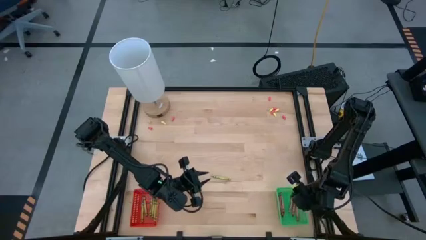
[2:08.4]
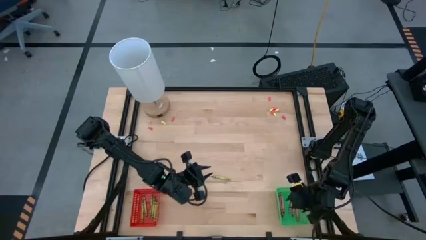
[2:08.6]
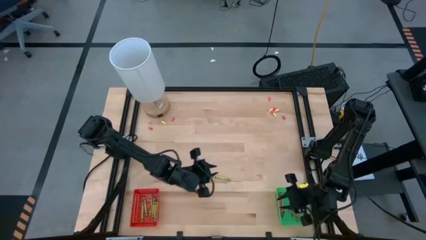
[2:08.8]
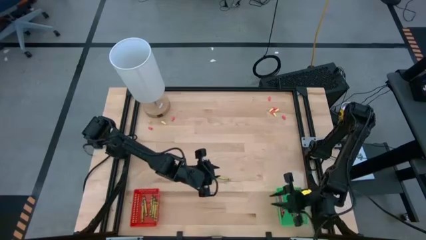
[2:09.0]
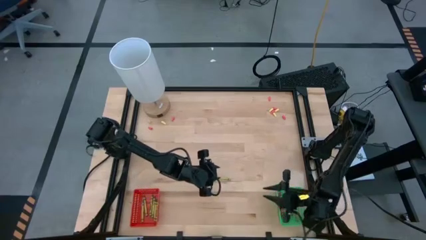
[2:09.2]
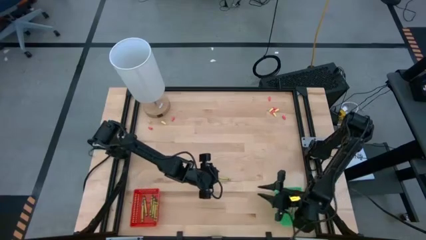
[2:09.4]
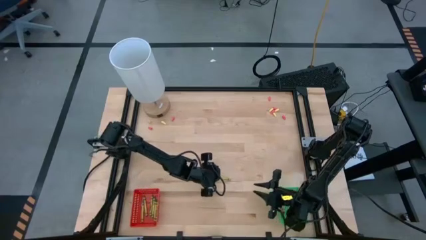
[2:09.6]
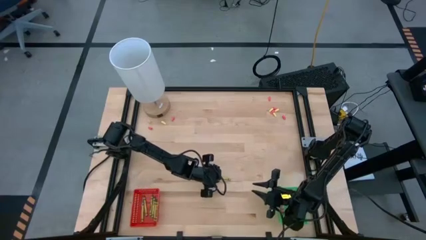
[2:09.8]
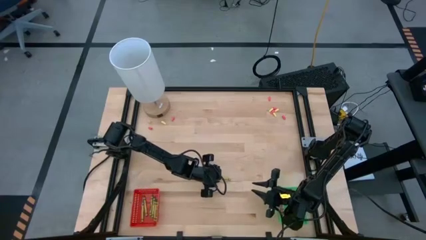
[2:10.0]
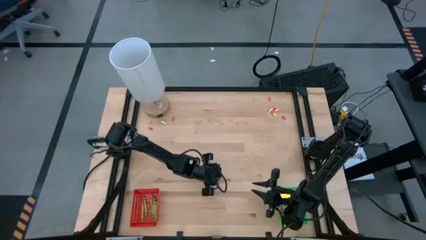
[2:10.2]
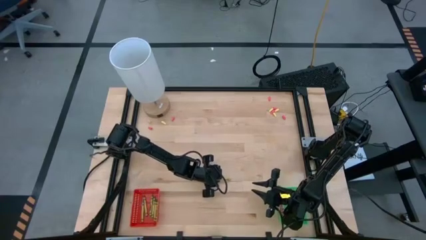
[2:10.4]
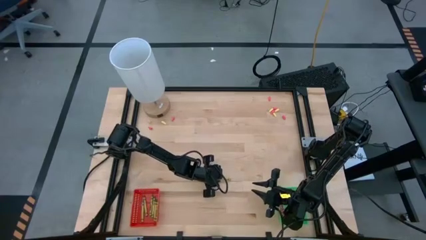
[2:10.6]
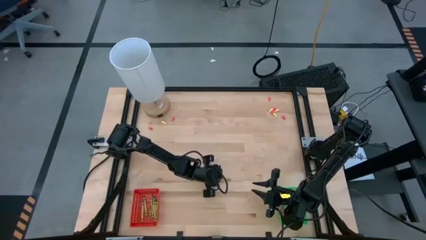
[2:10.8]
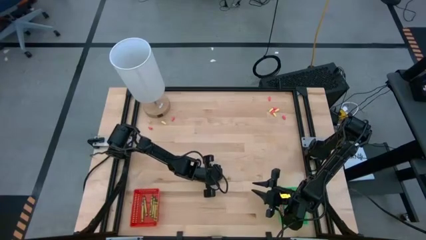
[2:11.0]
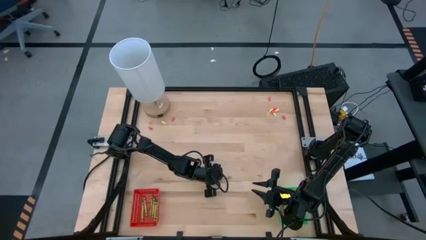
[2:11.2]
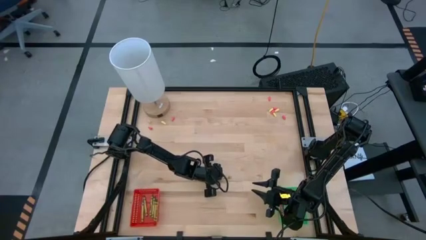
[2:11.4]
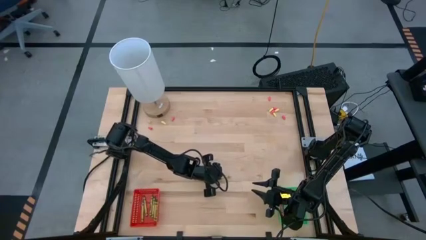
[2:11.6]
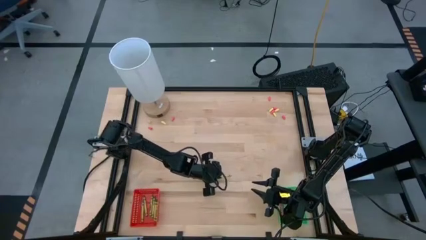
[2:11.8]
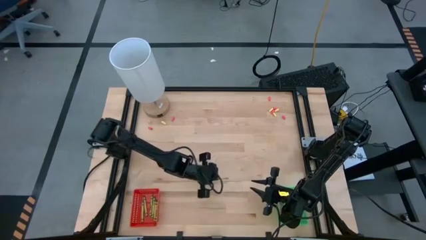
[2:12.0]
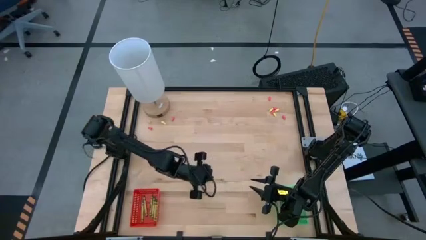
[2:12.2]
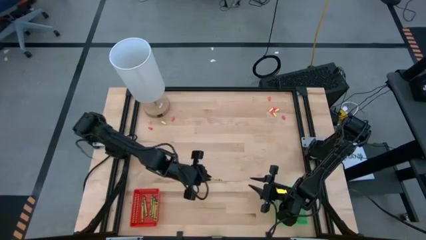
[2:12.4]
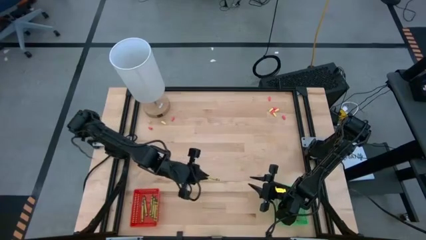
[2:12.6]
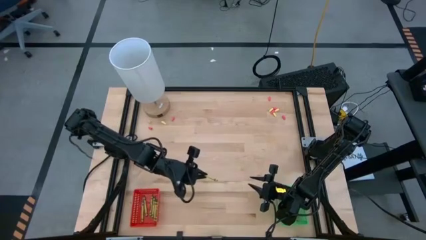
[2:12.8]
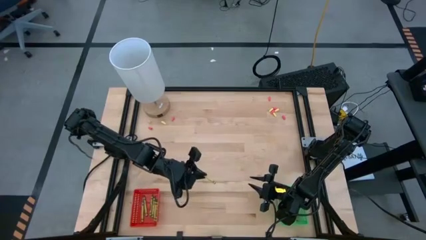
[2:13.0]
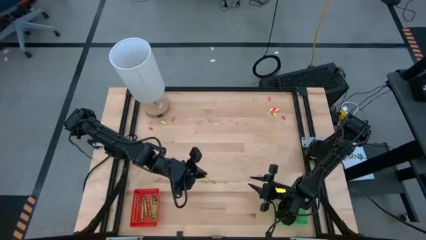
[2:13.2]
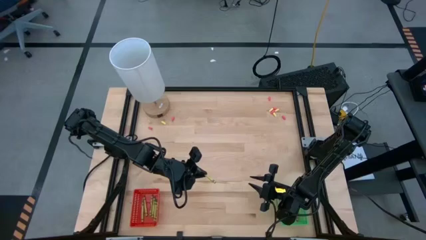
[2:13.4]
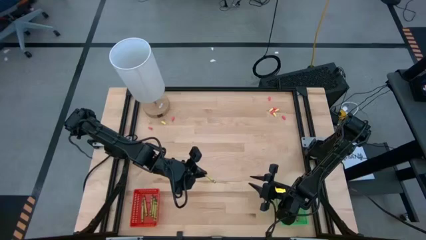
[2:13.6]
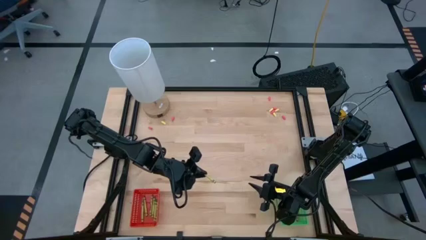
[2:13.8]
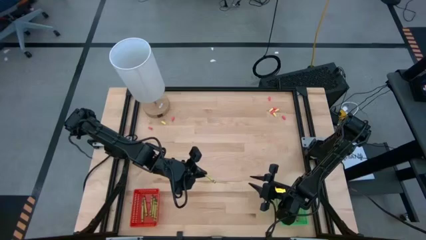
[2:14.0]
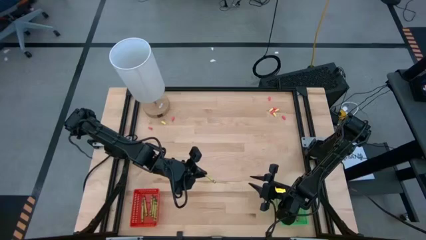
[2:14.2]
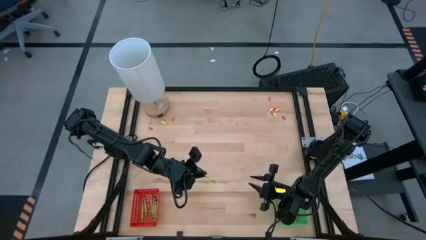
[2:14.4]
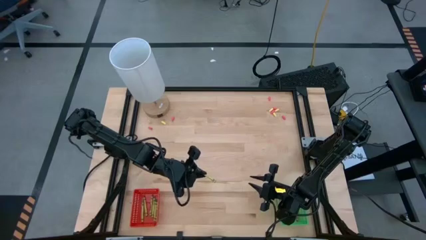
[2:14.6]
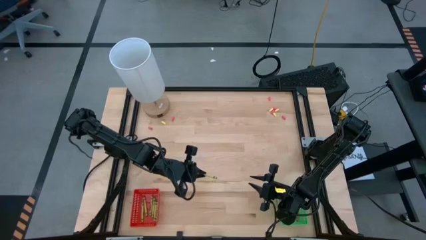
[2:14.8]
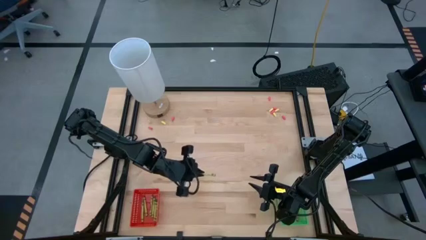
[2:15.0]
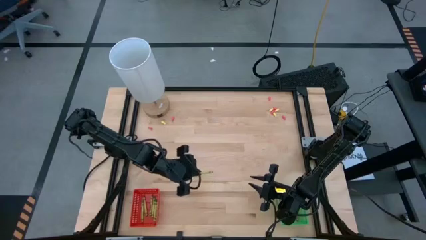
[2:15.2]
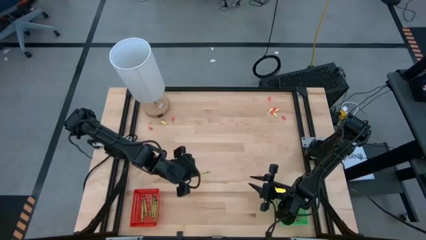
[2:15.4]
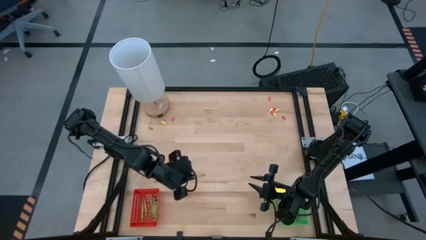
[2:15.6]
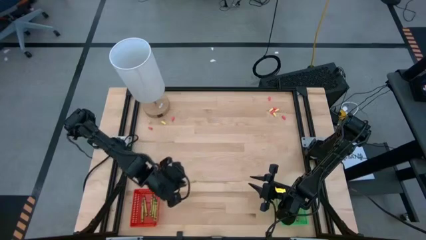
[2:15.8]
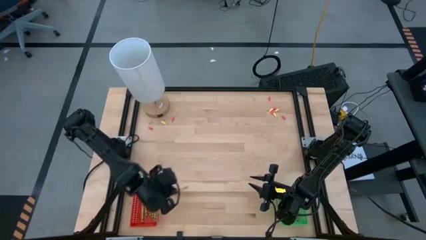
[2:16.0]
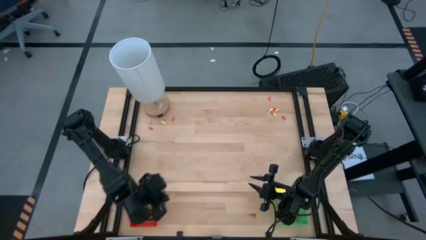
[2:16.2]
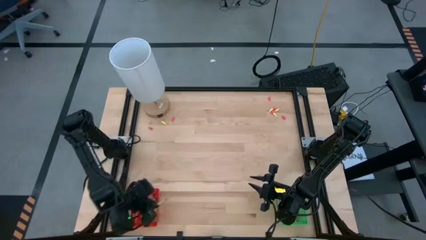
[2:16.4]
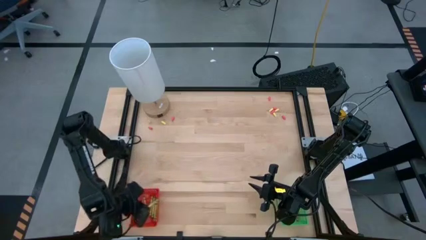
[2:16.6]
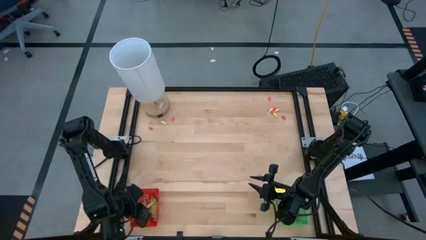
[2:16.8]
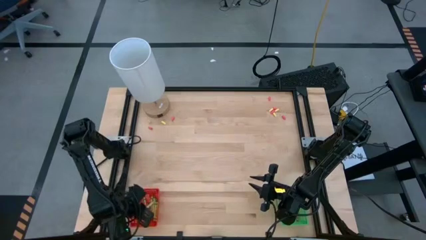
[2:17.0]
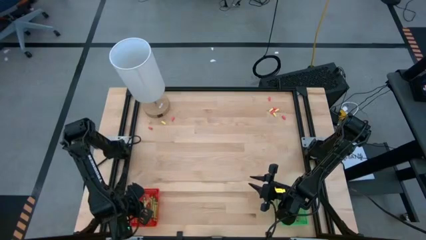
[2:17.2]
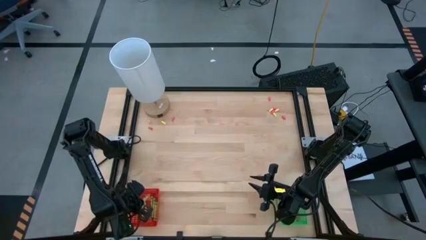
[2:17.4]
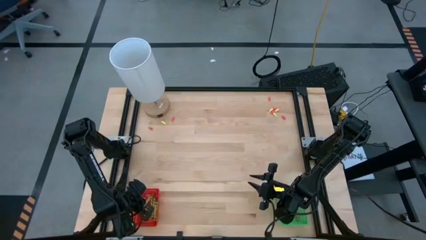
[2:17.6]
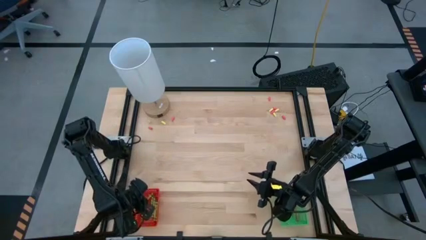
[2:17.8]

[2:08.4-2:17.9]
Task: Sort crayons
Put the green crayon into the red bin

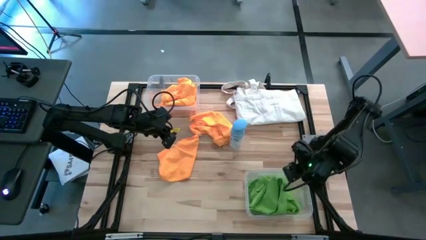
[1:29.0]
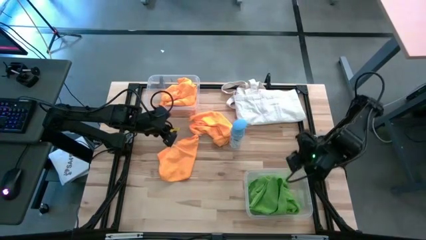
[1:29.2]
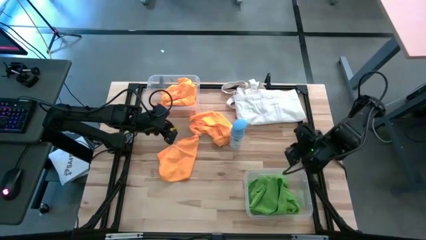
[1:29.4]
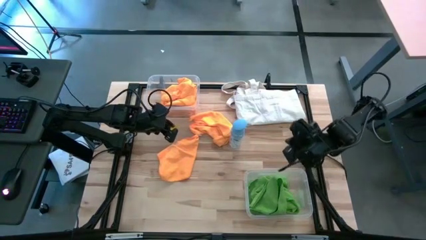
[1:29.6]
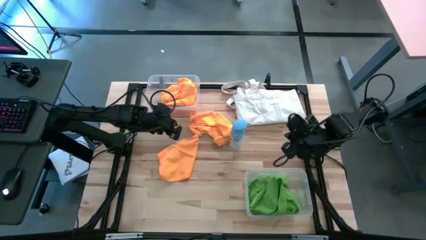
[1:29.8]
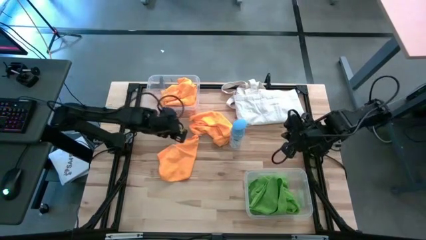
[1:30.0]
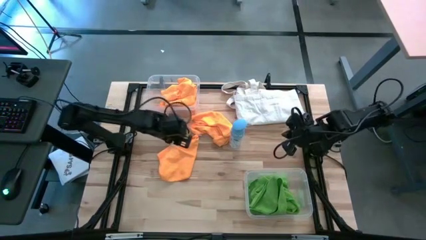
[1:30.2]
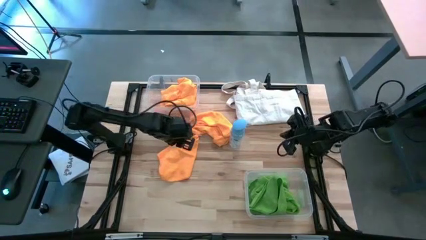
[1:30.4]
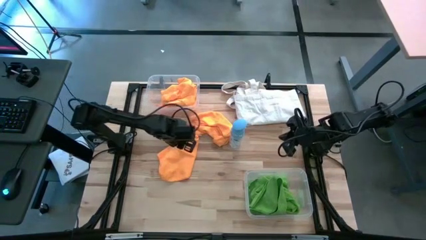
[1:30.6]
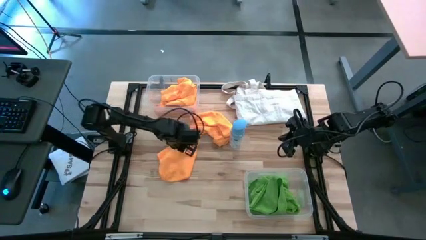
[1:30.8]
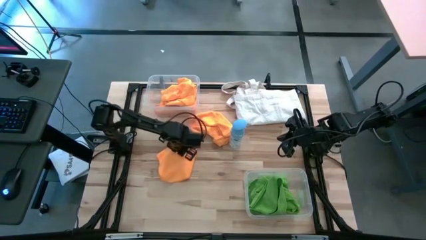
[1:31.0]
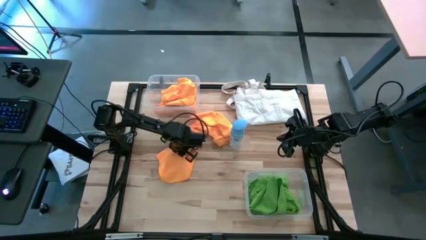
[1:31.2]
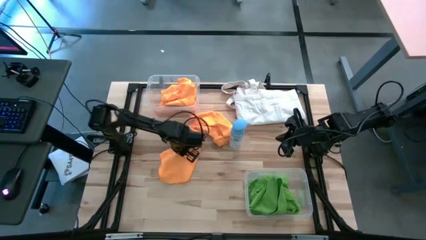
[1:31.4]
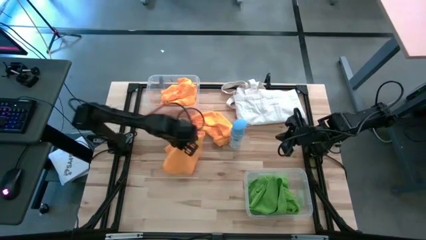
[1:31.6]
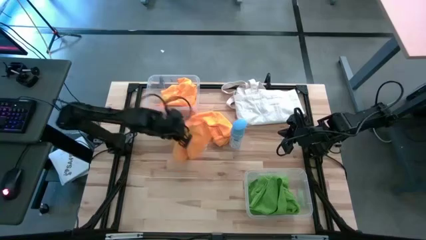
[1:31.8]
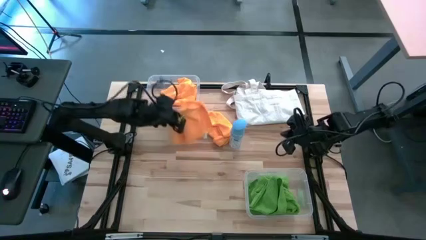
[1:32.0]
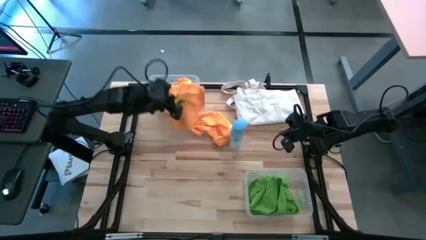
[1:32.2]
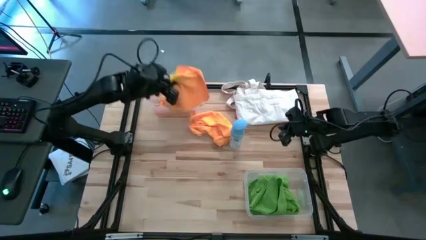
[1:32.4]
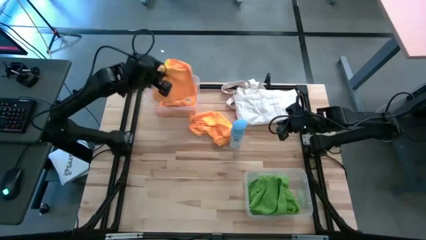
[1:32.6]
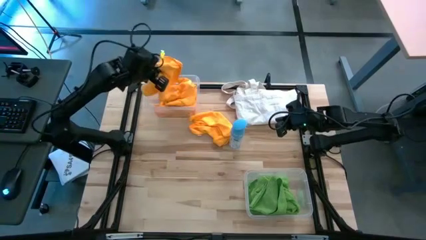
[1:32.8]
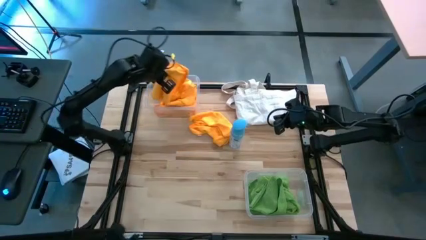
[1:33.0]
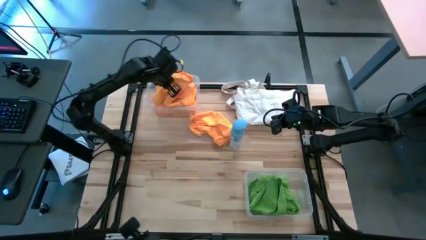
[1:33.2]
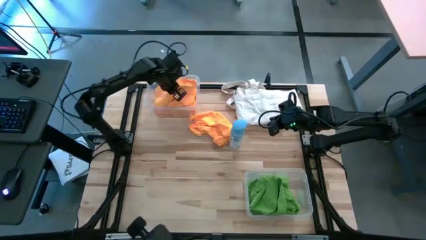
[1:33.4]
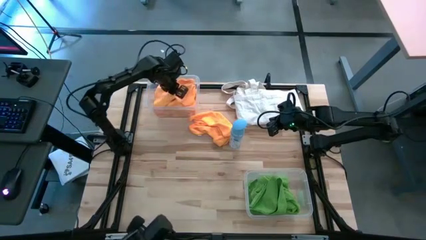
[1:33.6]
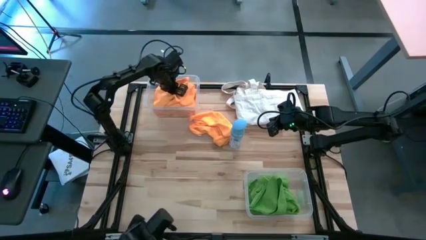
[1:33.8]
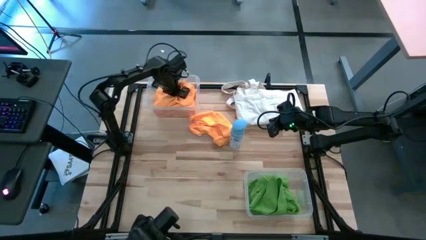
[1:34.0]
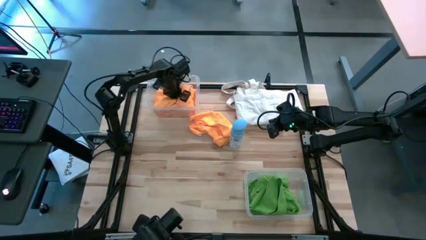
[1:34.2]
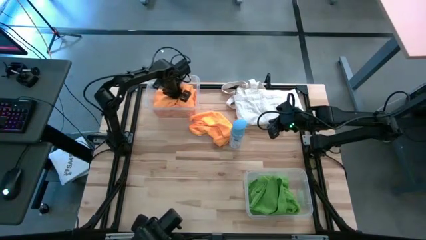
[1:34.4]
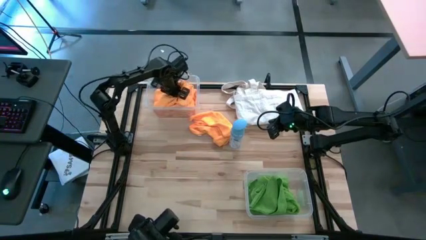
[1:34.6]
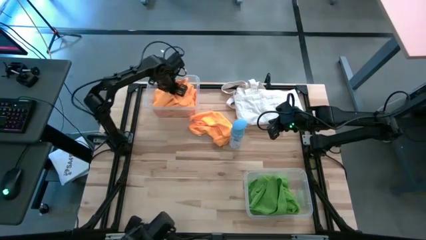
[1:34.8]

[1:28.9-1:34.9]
Task: Sort microfiber towel by color & place in baskets
Put the yellow microfiber towel into the top transparent bin
